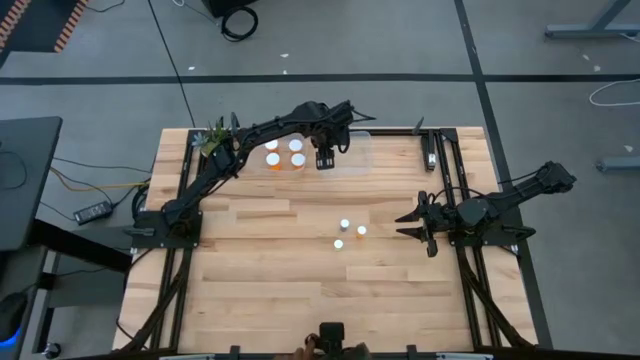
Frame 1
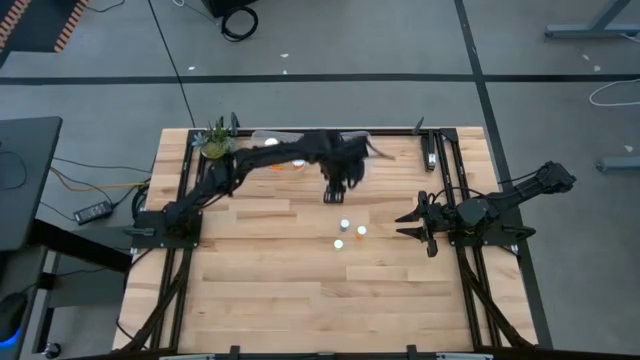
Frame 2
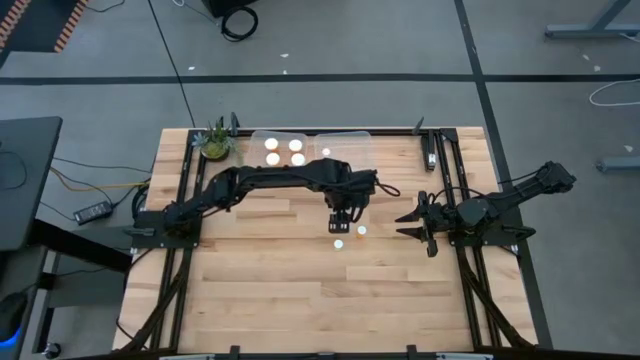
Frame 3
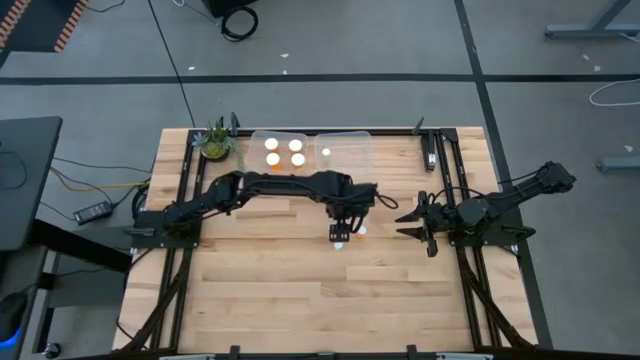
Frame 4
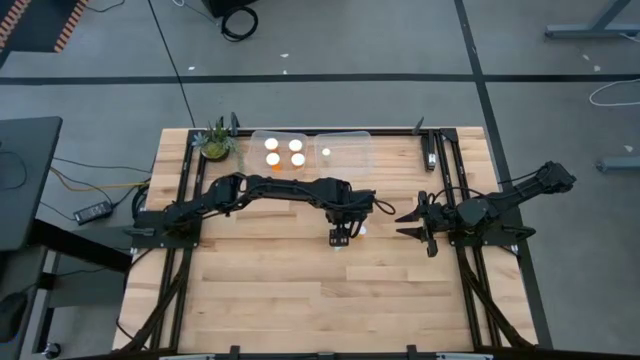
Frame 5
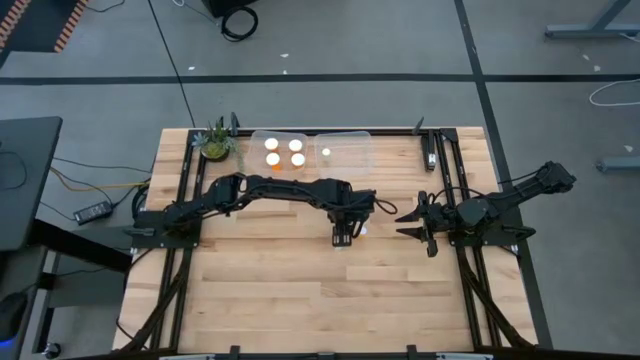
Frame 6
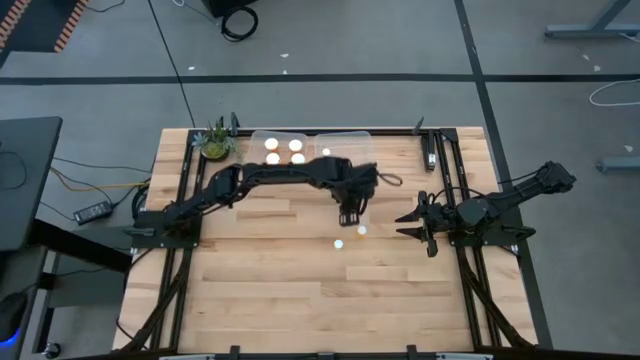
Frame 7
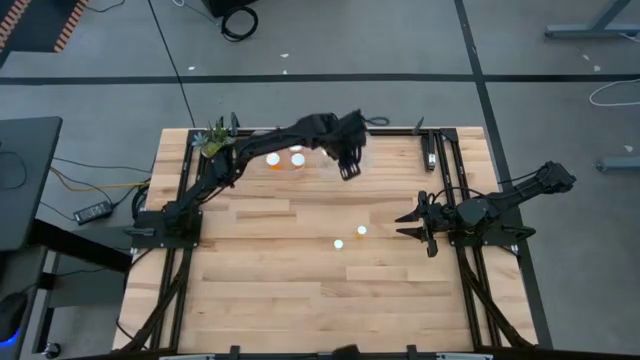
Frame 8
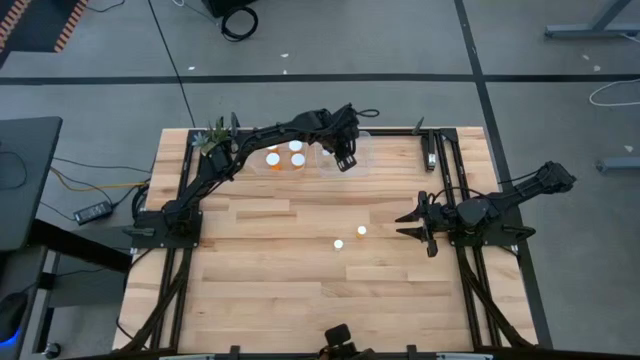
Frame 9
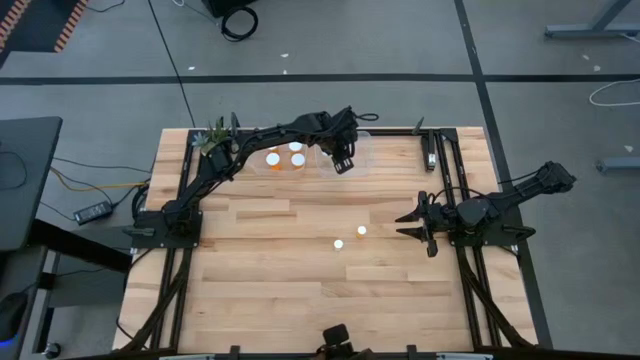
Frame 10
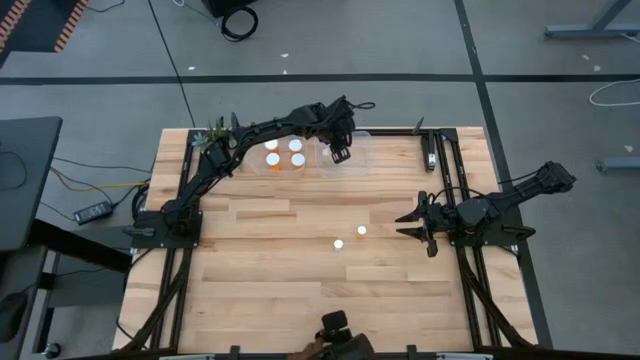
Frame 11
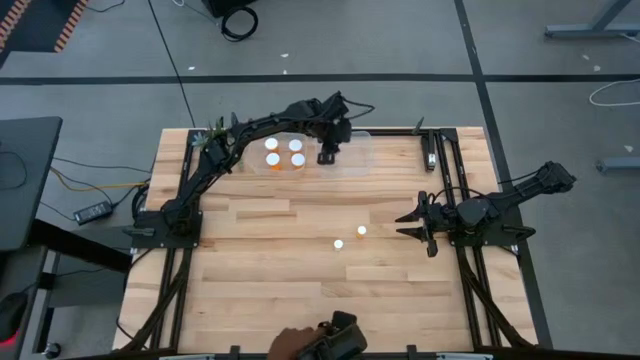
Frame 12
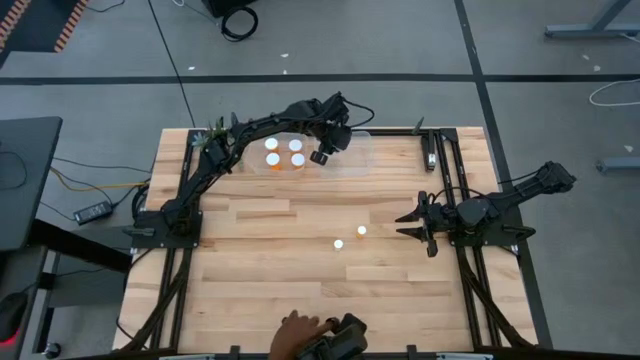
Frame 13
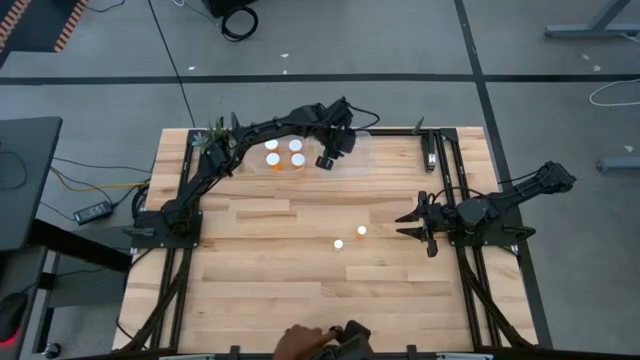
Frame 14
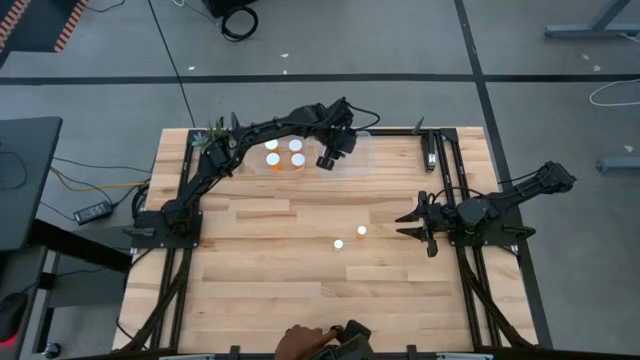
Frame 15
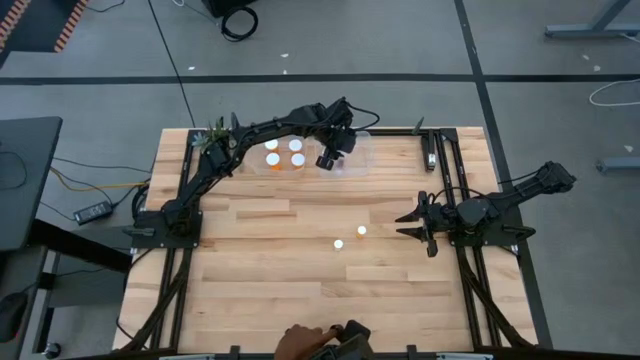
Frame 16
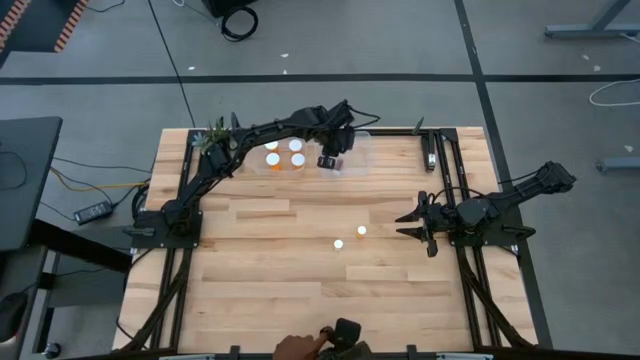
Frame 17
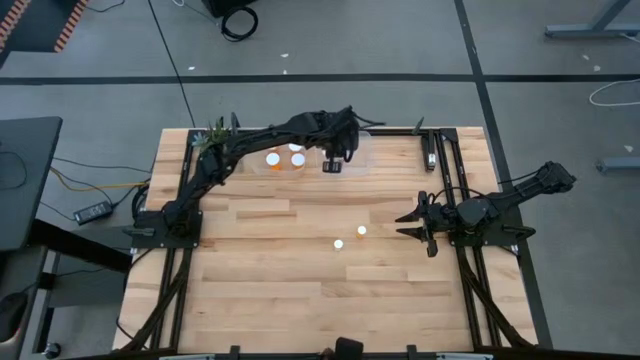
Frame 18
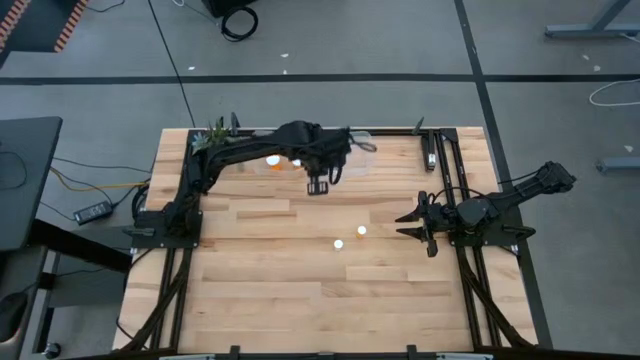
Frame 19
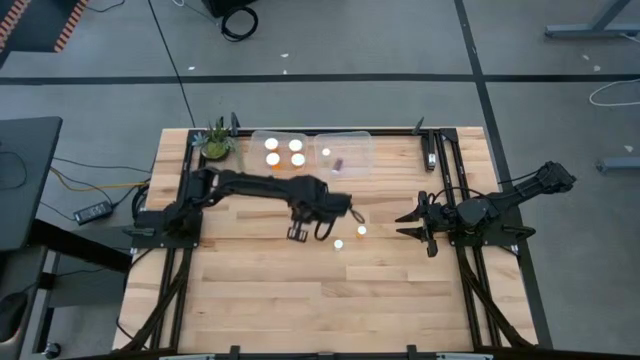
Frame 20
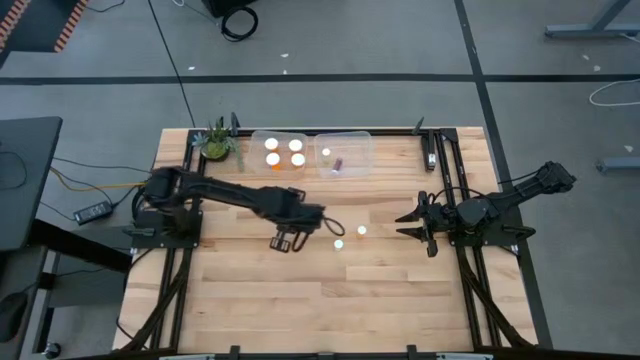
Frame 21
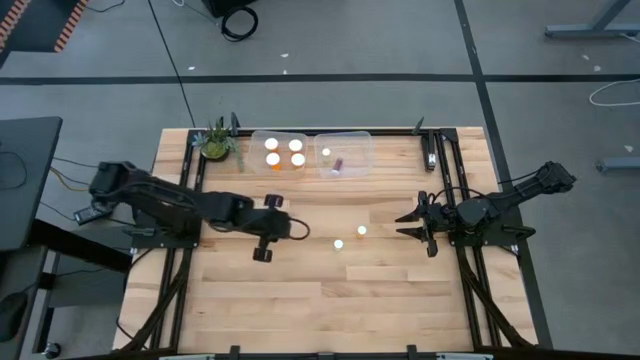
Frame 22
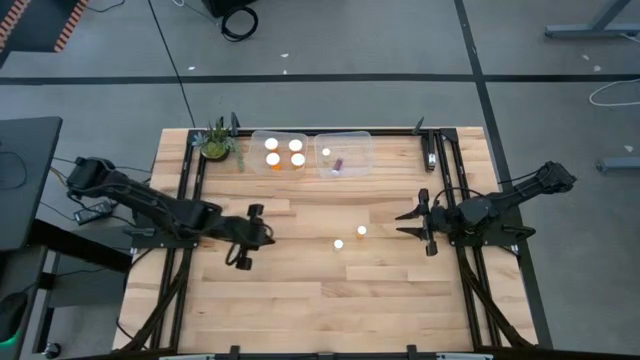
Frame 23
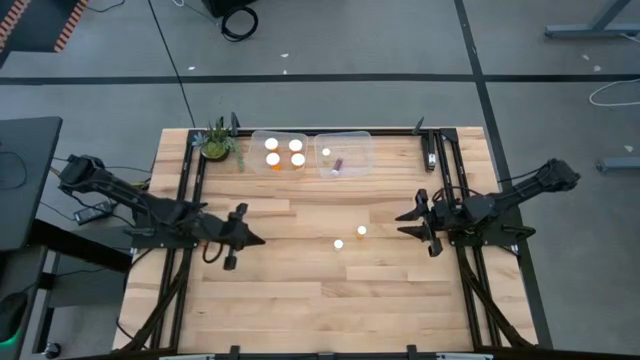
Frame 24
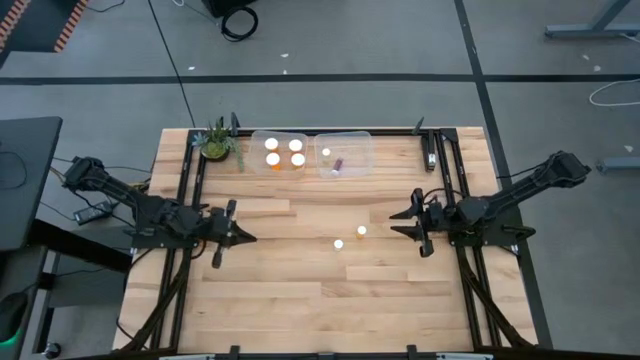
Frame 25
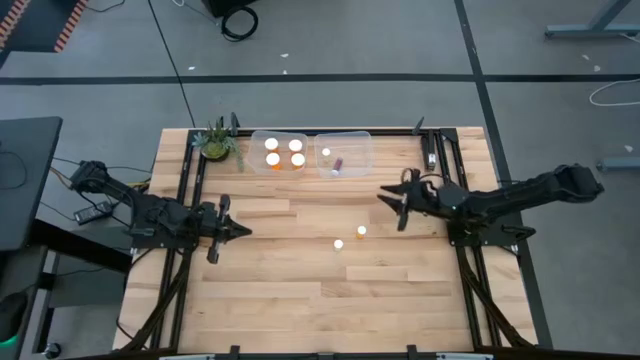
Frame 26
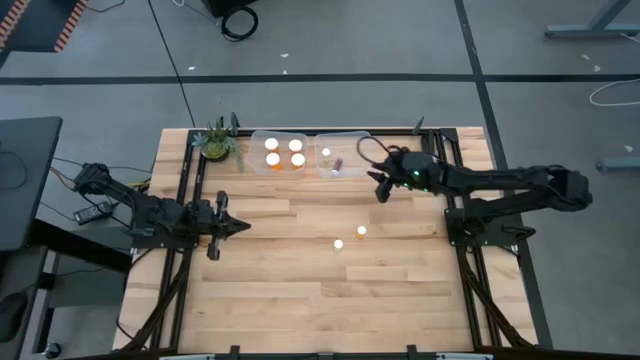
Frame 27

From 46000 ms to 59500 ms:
Task: Pick and place medicine bottles into bin by pill shape (circle, oval)
Put the small blue pill bottle into the right bin

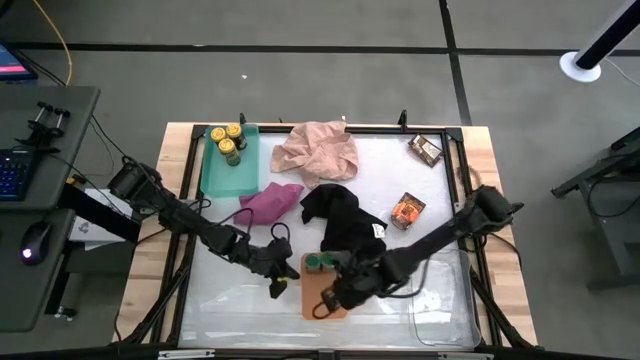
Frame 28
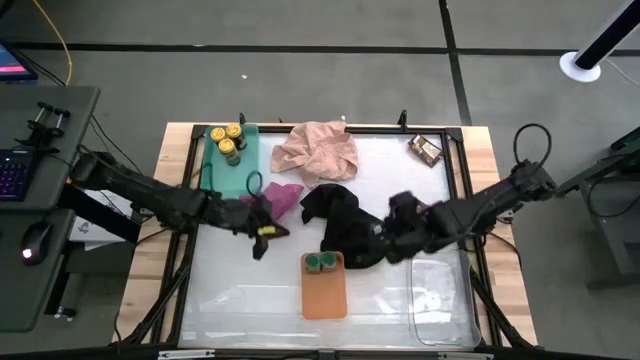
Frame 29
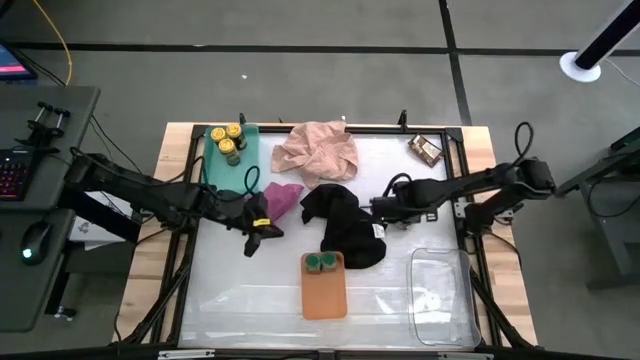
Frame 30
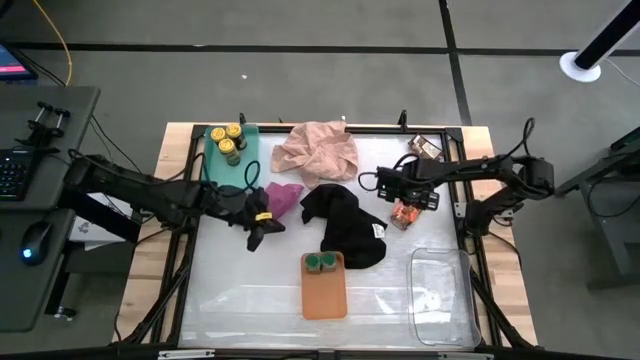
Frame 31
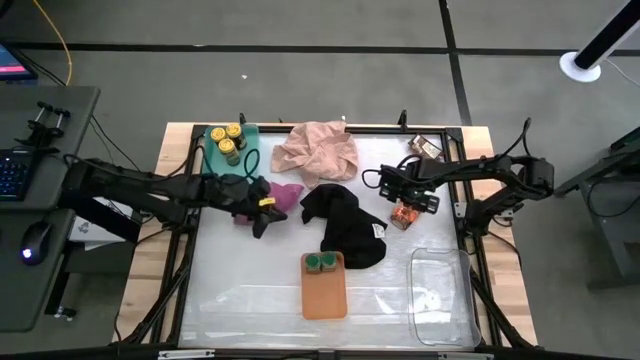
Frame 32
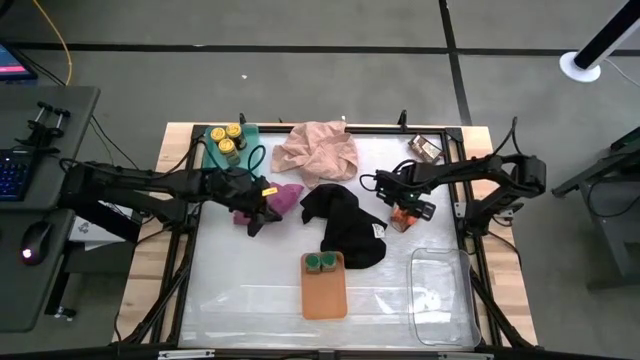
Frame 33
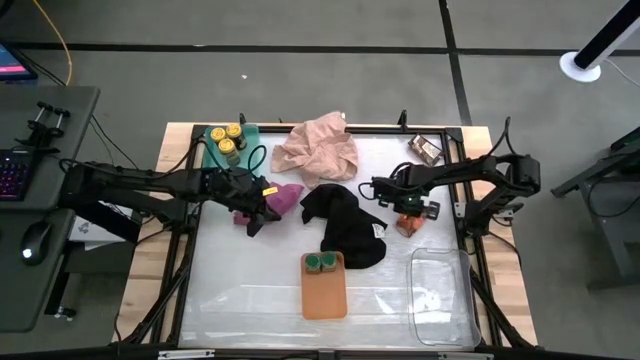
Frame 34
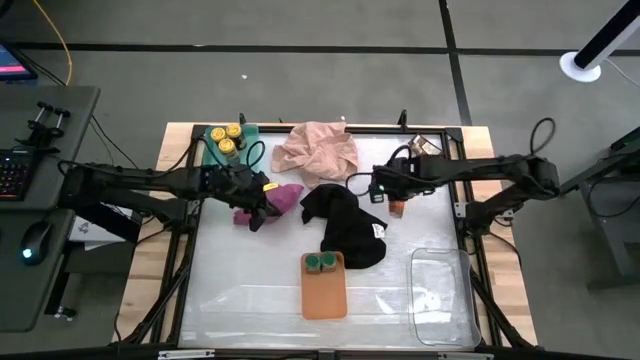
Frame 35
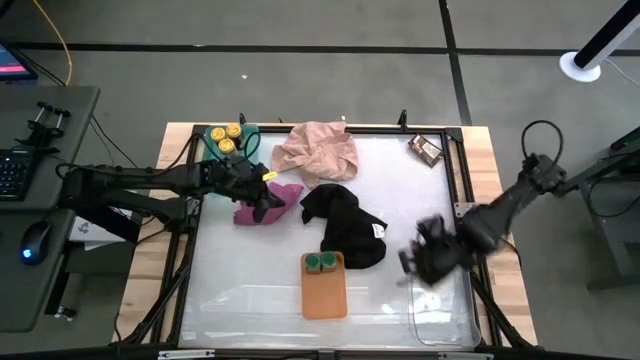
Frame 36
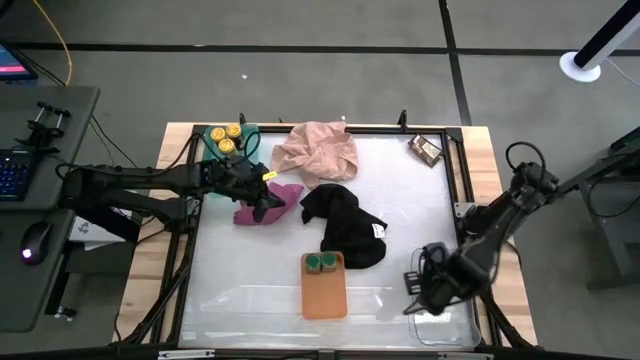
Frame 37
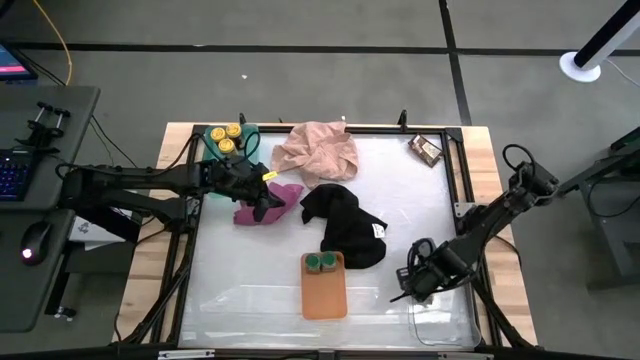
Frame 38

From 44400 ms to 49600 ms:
Task: Sort spices by type
Put the orange seasoning bag into the transparent bin
